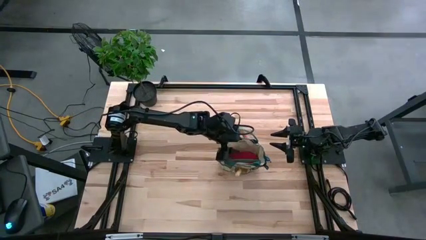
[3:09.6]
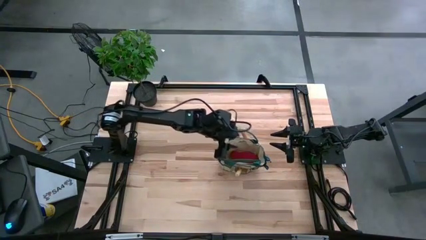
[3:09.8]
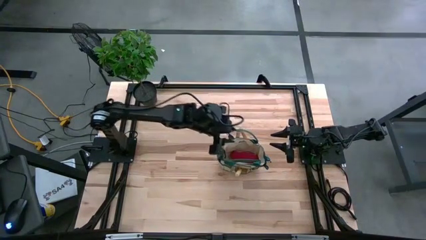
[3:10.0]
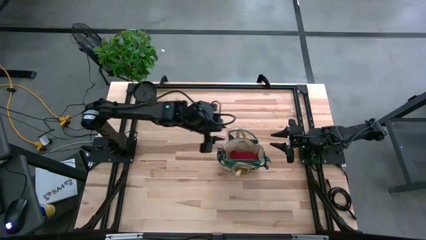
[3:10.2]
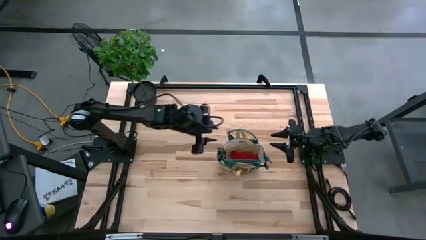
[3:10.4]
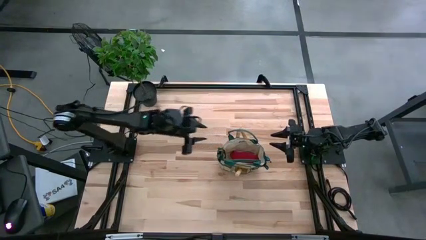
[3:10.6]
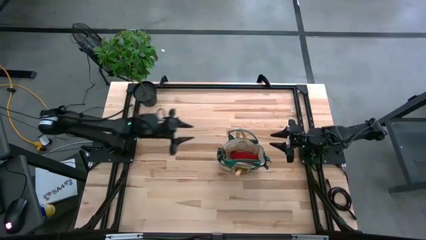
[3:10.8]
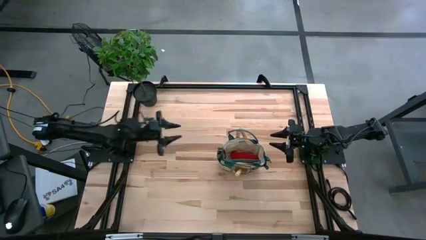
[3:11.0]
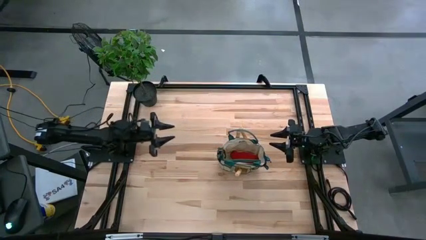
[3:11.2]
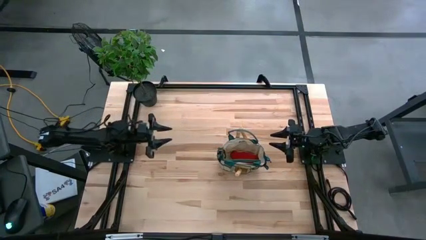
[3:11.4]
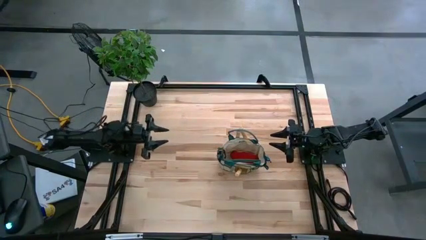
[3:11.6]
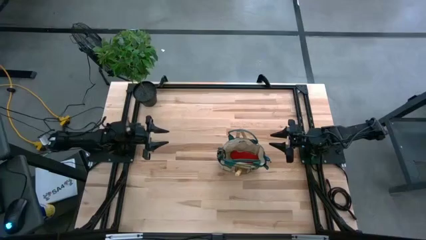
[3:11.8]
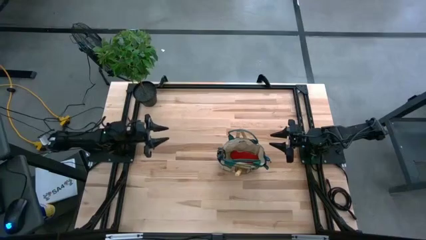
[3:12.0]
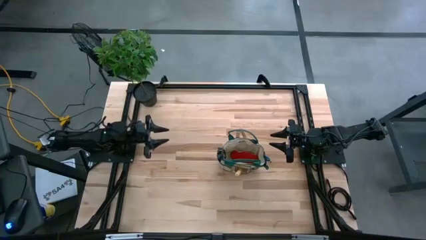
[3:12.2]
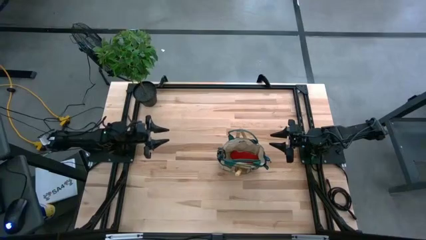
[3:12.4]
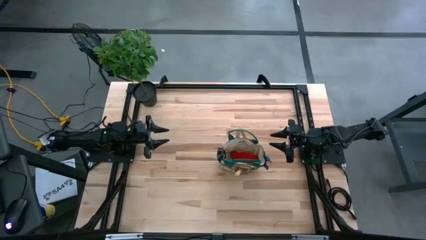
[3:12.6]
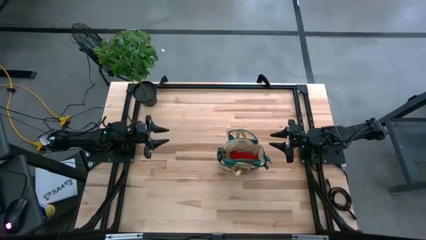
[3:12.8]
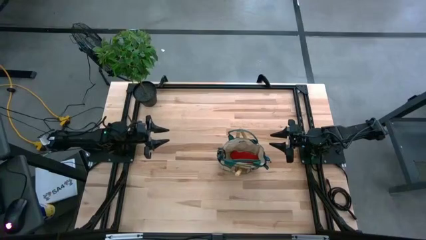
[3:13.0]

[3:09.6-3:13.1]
Task: Pick & Place Garden tools in Gardening bag
Return to Home Position

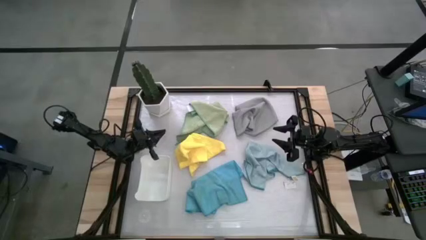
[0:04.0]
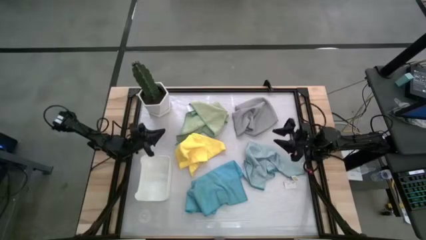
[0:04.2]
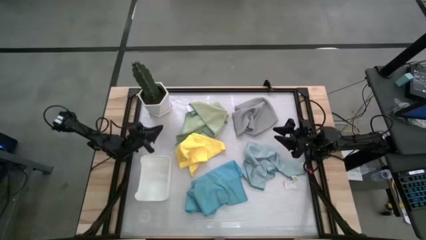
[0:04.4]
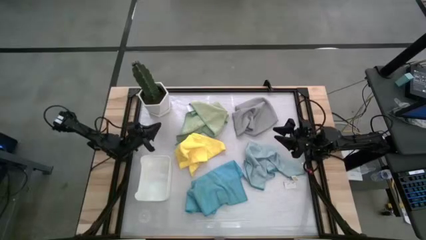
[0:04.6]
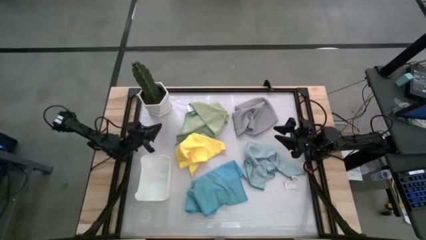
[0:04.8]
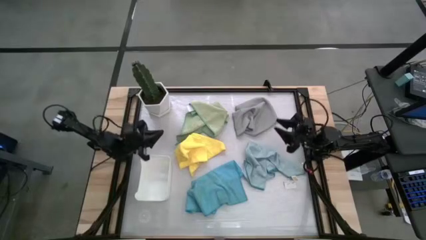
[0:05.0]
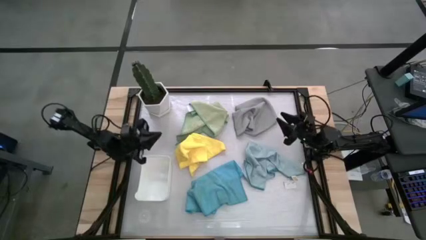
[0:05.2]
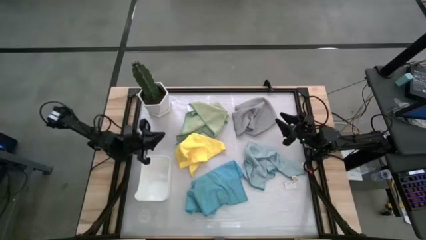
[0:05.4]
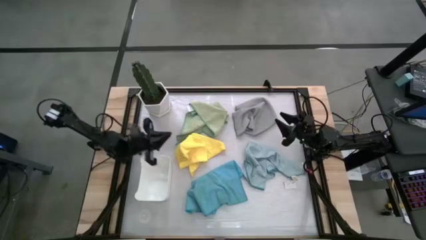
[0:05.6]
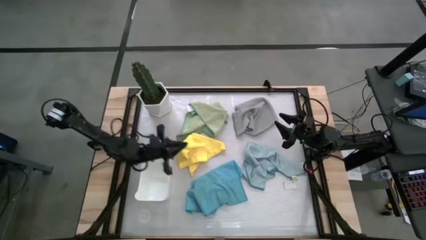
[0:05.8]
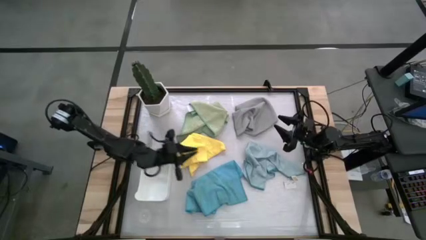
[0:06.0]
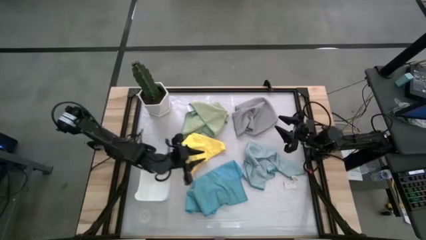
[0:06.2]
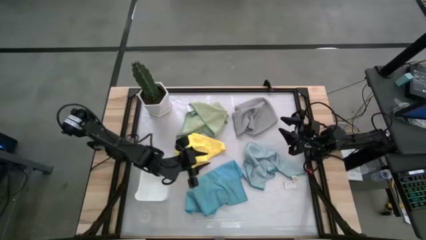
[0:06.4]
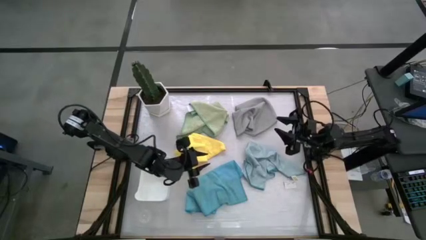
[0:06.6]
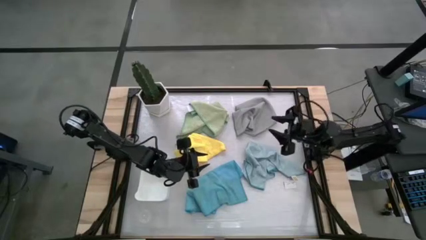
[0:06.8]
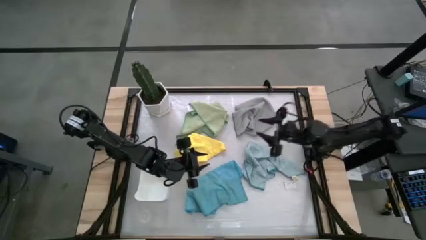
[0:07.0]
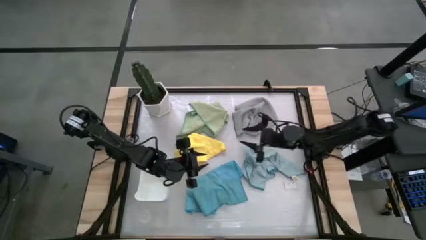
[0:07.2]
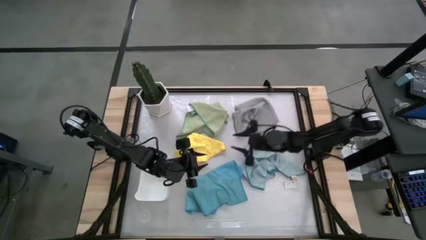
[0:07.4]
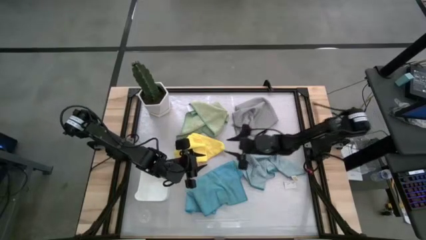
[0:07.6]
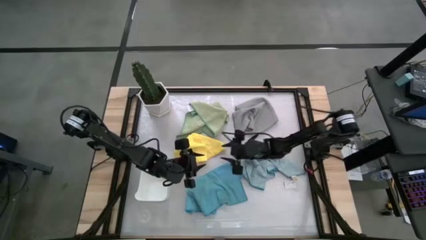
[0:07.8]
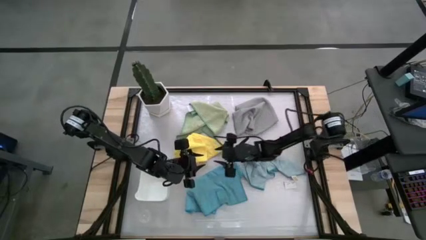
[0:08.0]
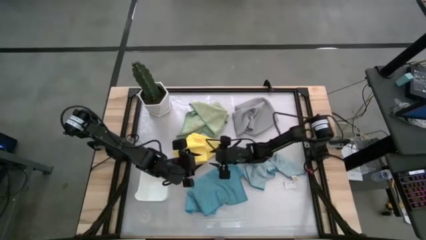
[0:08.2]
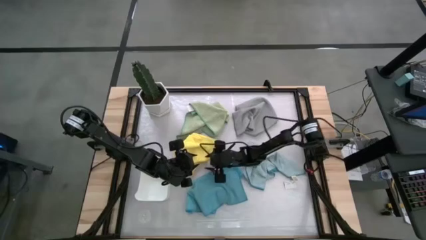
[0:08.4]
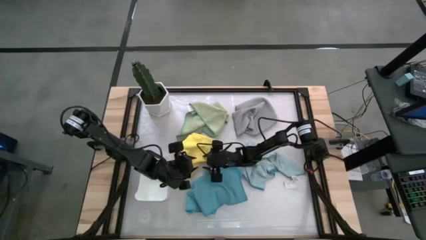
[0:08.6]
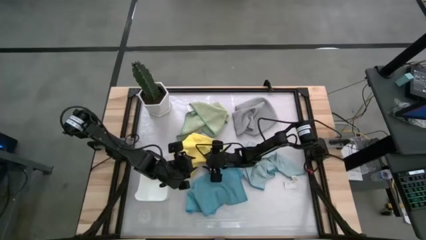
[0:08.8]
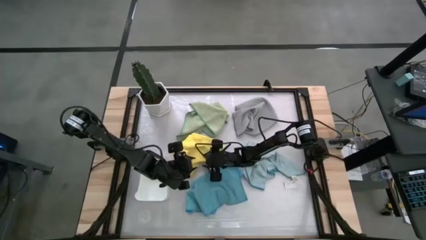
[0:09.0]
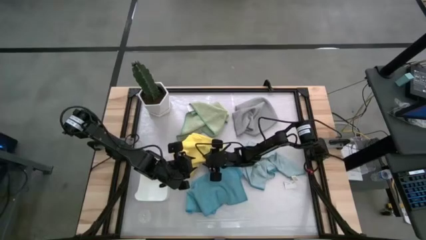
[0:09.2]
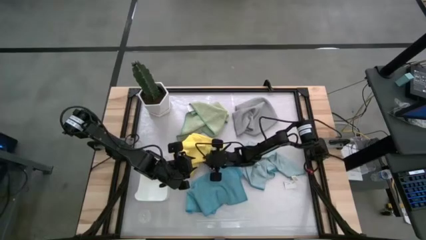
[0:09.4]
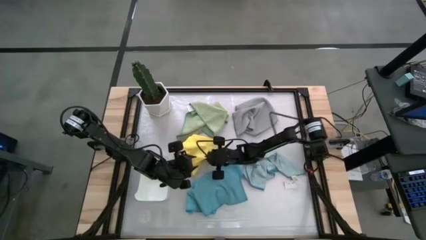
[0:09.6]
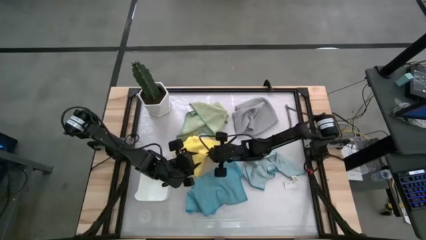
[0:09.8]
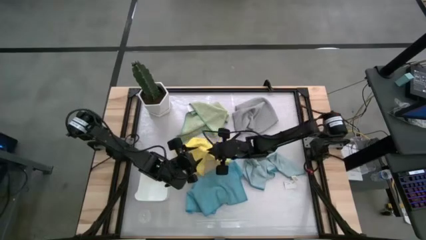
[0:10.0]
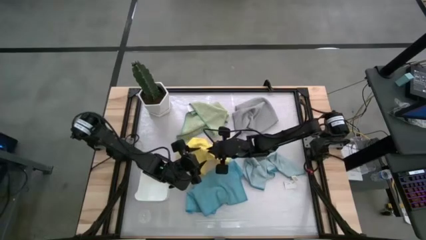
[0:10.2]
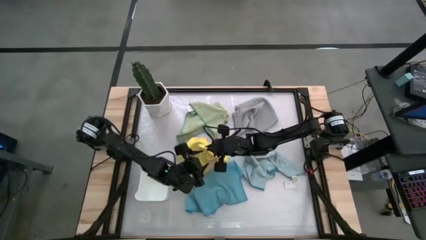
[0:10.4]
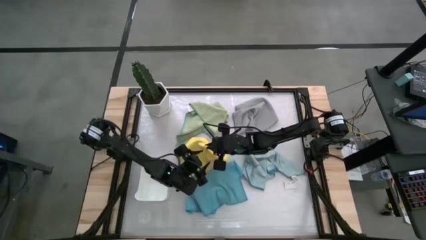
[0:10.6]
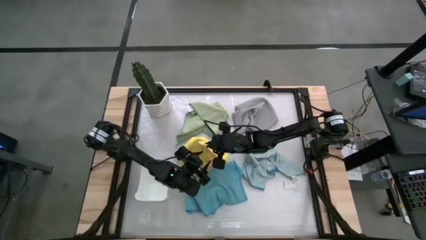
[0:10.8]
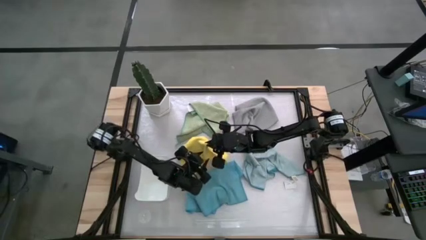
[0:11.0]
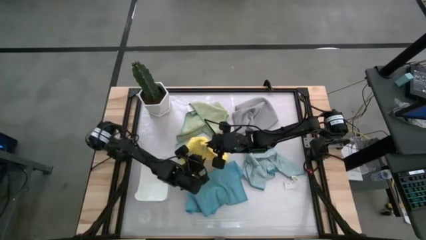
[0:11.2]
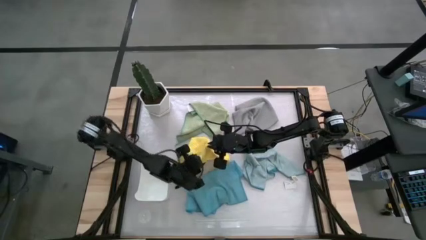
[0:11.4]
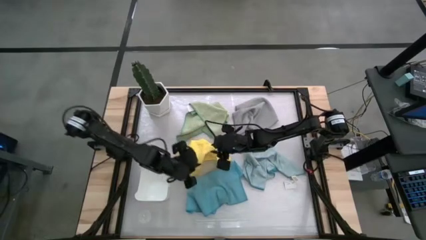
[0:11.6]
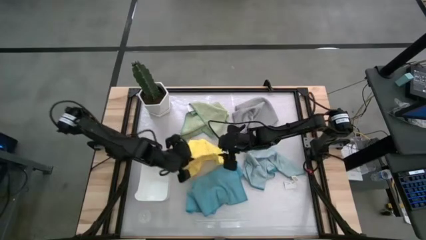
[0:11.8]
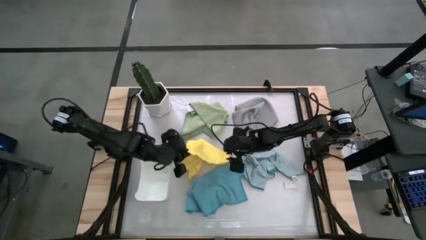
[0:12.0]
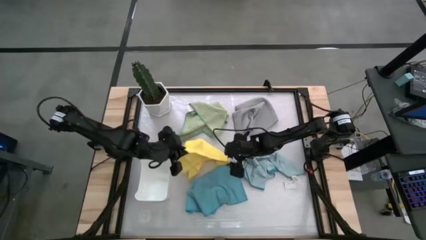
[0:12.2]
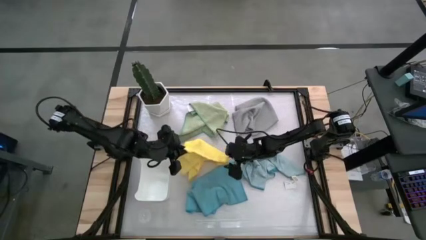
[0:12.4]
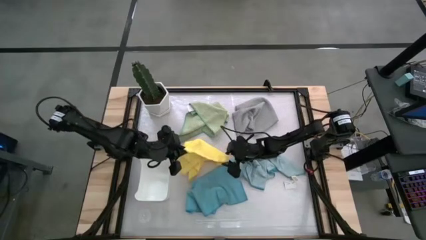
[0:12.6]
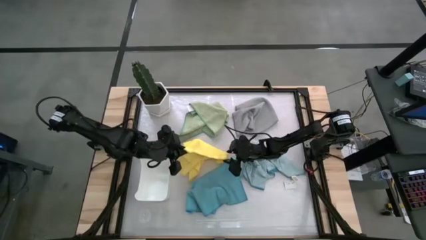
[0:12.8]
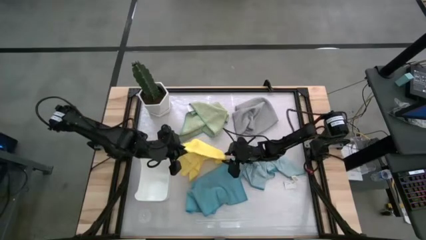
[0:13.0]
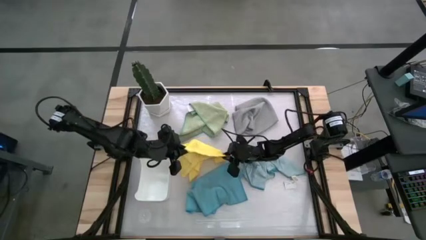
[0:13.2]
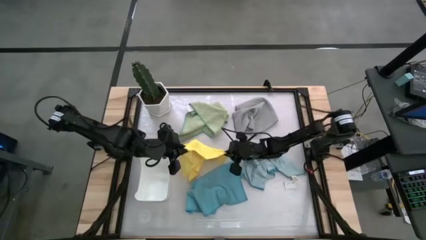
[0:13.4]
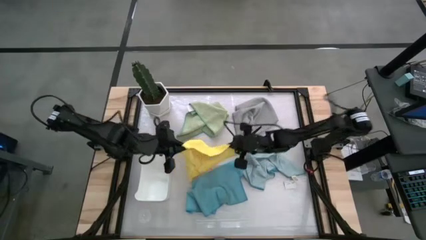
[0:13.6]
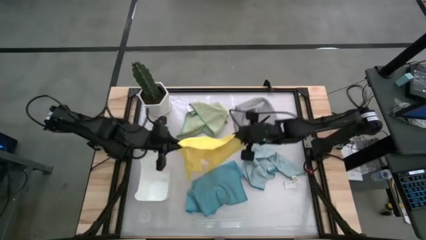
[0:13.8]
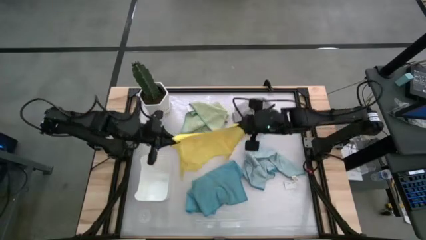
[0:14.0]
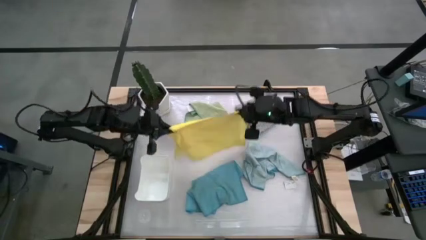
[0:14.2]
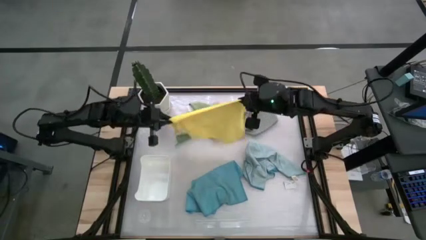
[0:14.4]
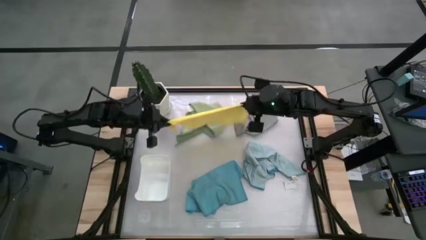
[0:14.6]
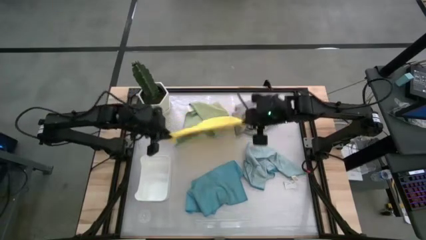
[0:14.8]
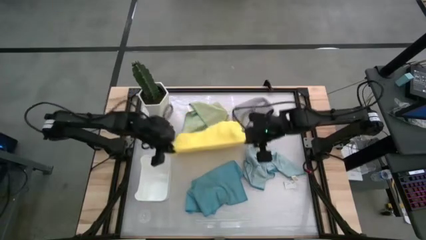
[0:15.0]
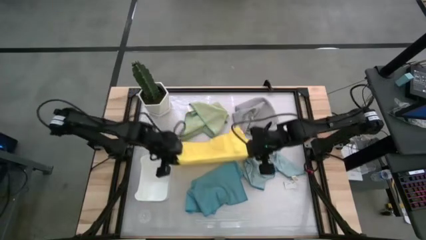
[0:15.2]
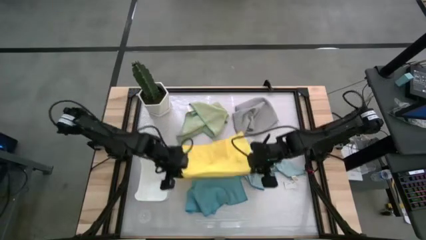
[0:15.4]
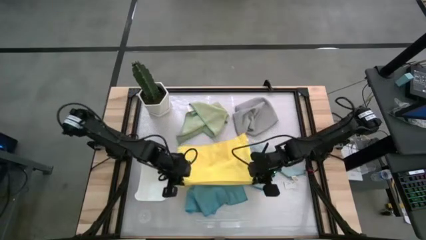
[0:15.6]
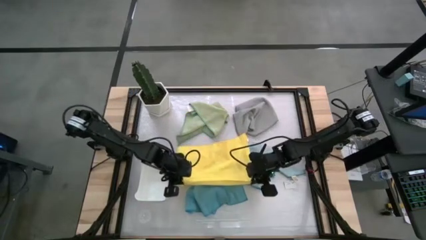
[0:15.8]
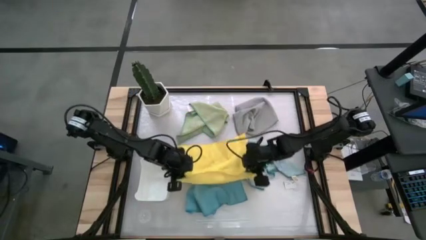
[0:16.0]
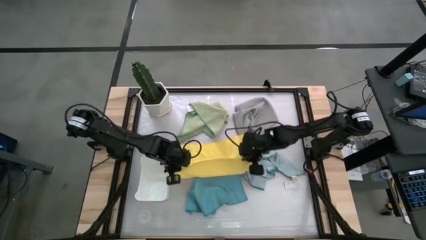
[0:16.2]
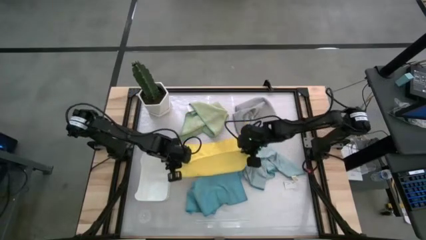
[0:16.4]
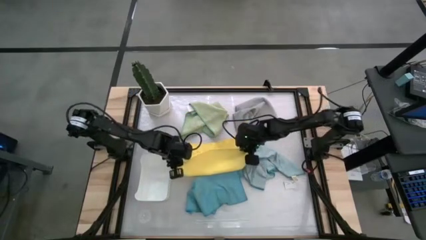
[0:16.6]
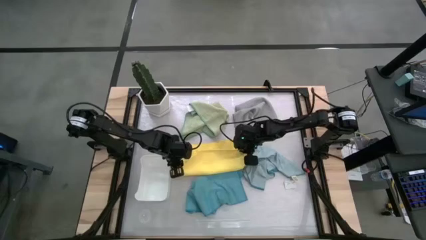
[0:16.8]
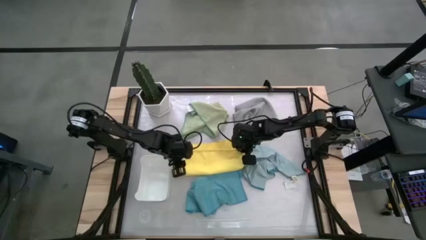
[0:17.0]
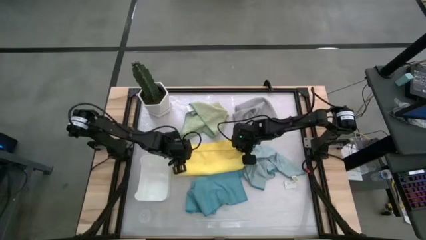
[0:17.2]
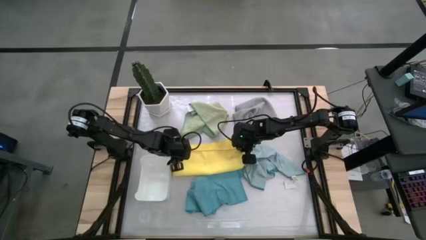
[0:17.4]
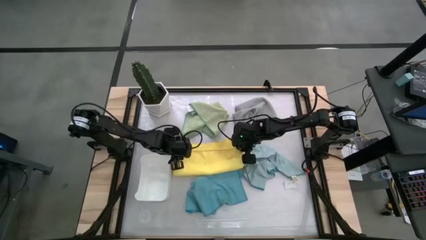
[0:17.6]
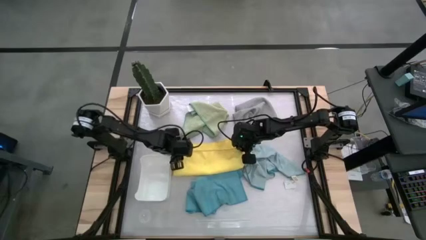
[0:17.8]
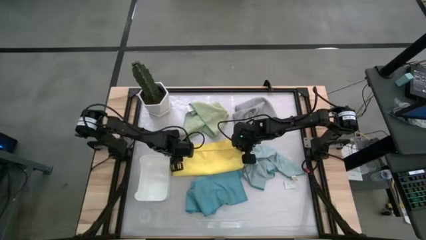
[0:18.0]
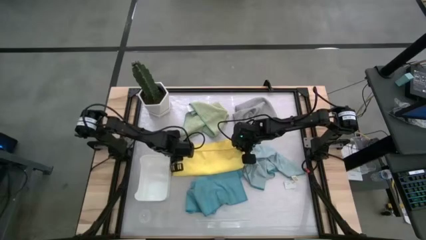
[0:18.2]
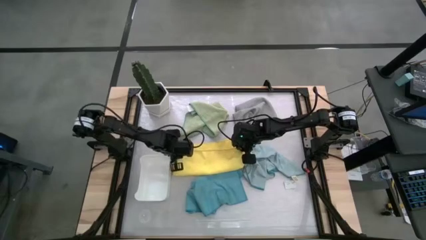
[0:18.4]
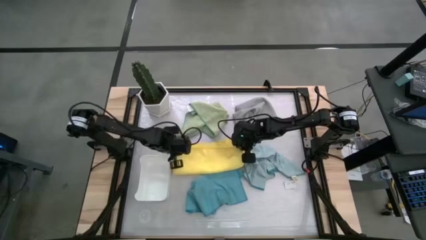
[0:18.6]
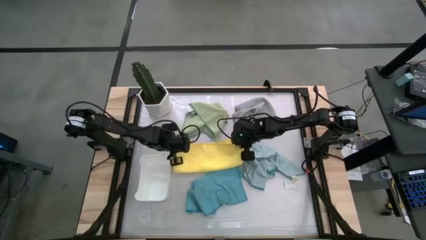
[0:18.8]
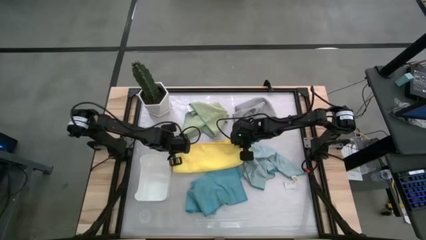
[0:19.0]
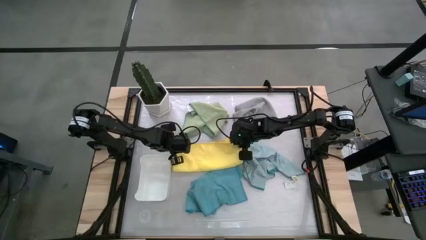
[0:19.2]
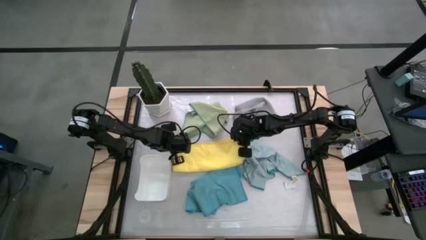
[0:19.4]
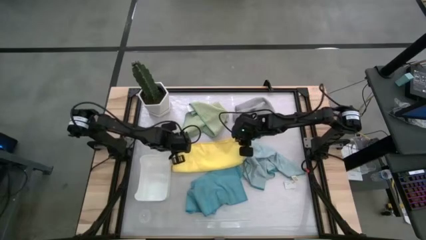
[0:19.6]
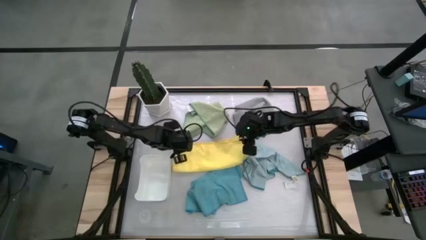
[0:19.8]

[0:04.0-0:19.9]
Task: Fold microfiber towels
Fold the yellow microfiber towel
